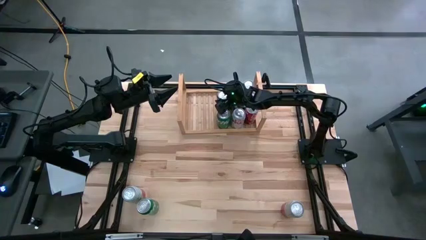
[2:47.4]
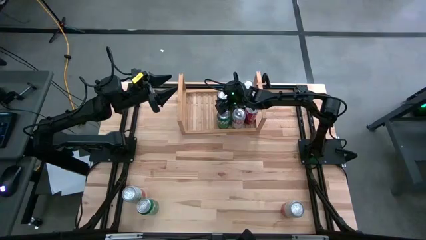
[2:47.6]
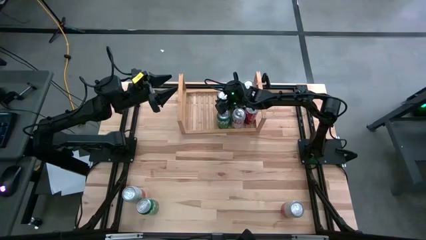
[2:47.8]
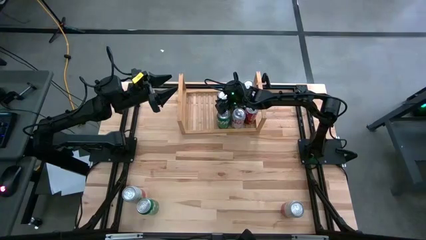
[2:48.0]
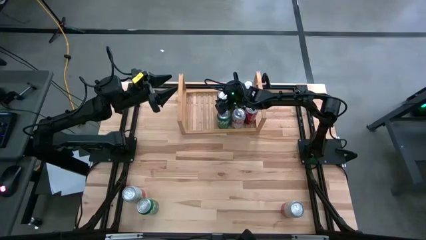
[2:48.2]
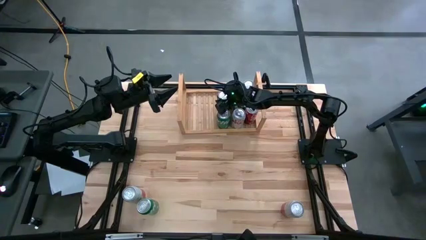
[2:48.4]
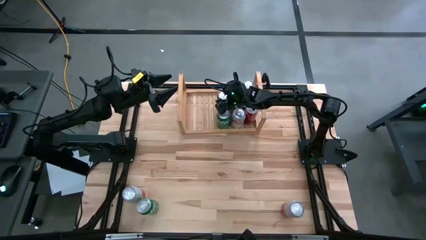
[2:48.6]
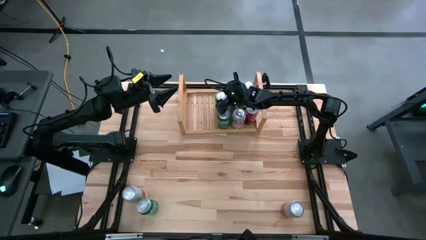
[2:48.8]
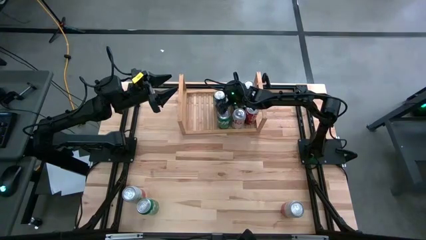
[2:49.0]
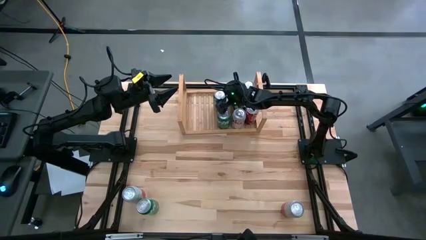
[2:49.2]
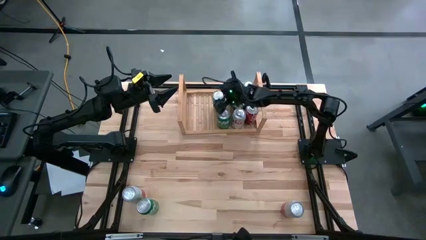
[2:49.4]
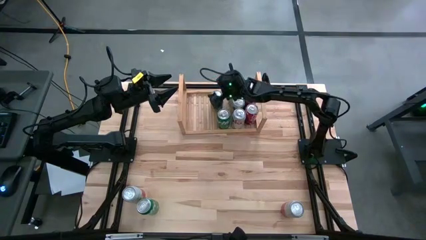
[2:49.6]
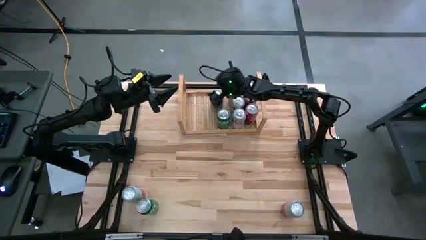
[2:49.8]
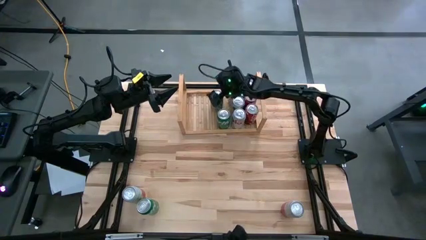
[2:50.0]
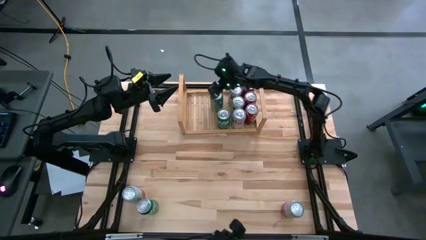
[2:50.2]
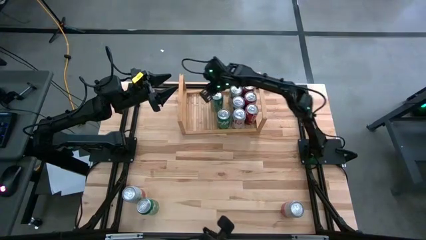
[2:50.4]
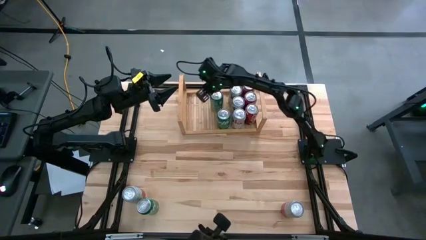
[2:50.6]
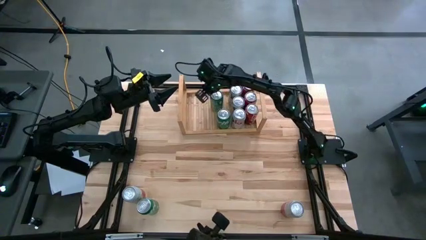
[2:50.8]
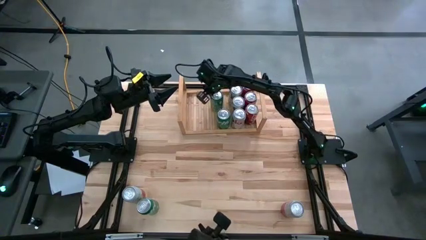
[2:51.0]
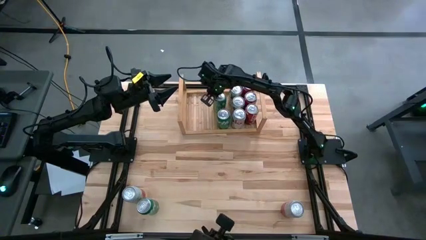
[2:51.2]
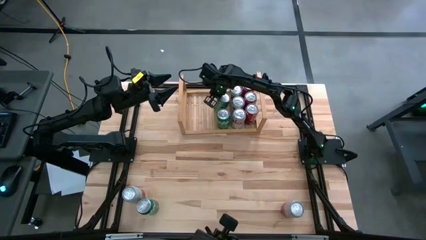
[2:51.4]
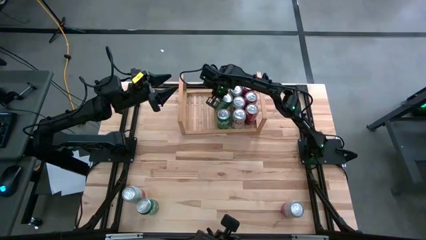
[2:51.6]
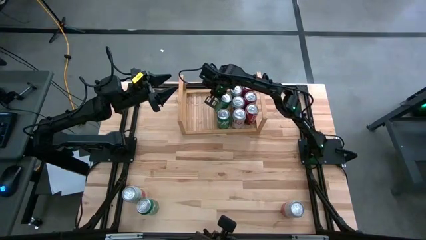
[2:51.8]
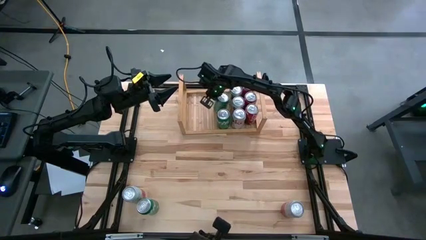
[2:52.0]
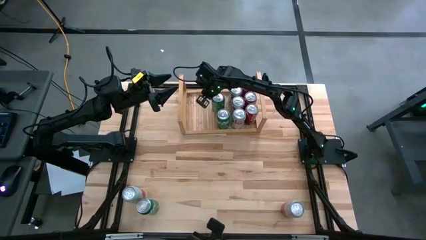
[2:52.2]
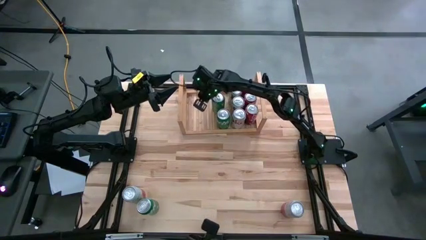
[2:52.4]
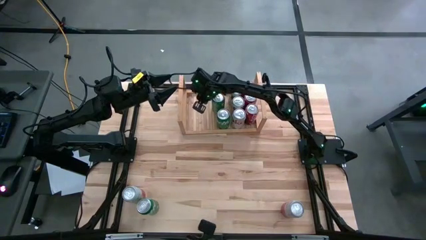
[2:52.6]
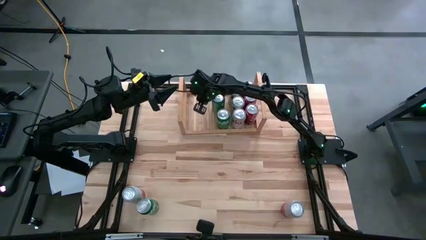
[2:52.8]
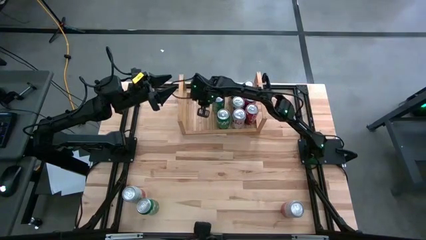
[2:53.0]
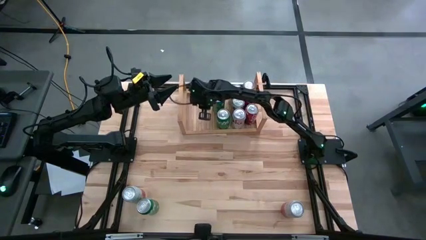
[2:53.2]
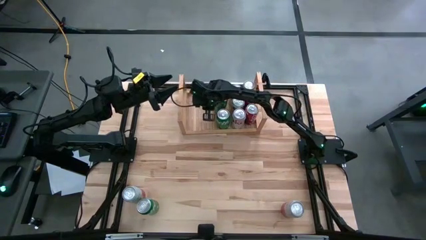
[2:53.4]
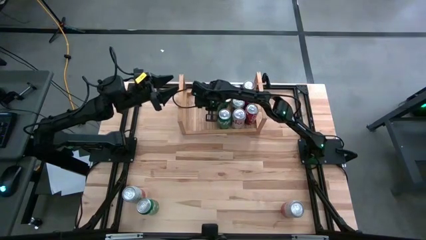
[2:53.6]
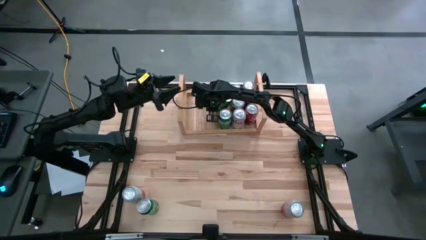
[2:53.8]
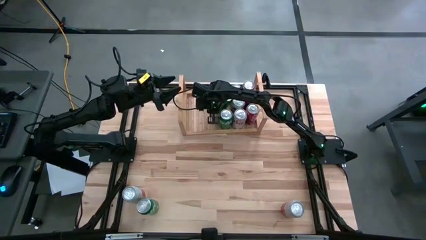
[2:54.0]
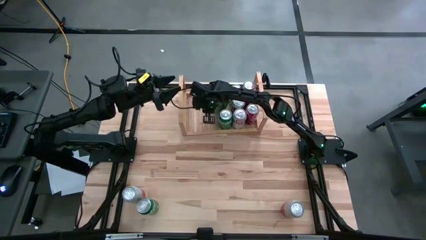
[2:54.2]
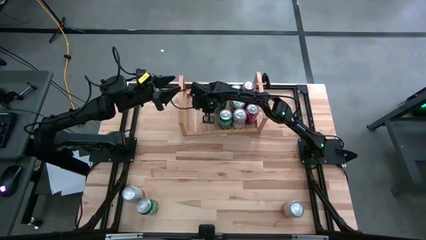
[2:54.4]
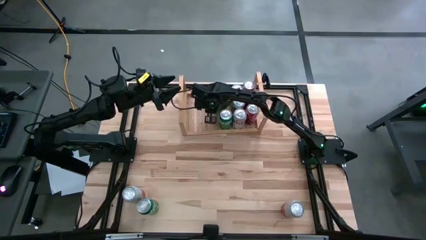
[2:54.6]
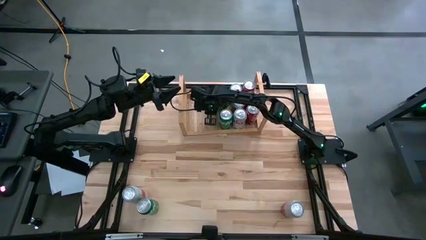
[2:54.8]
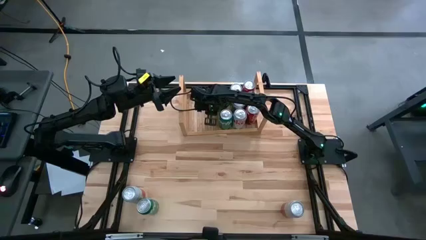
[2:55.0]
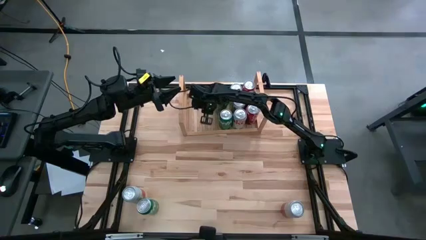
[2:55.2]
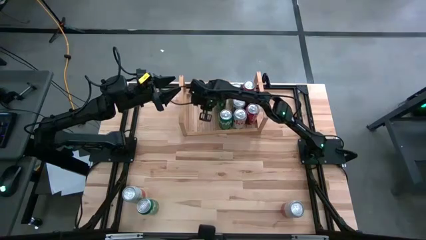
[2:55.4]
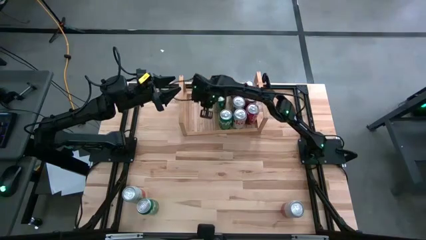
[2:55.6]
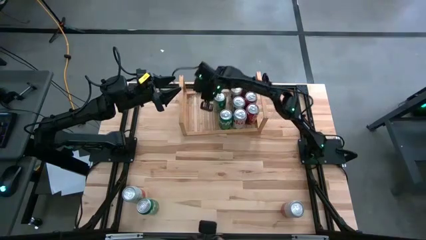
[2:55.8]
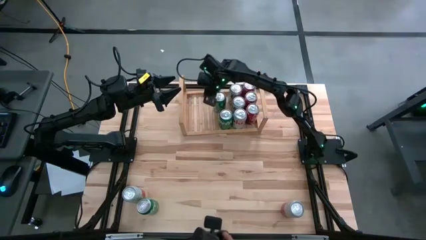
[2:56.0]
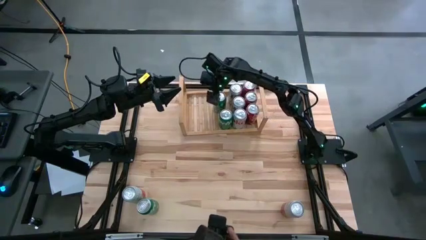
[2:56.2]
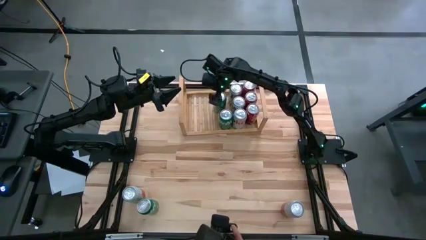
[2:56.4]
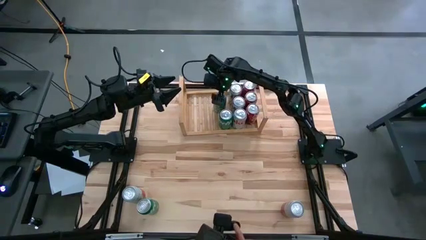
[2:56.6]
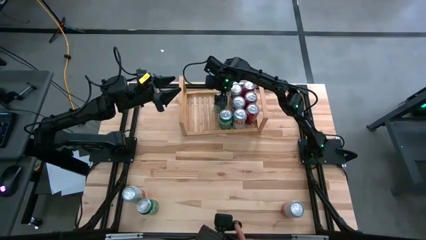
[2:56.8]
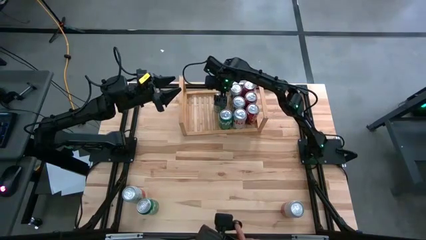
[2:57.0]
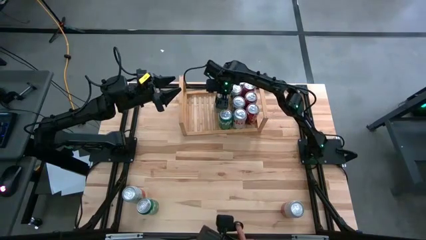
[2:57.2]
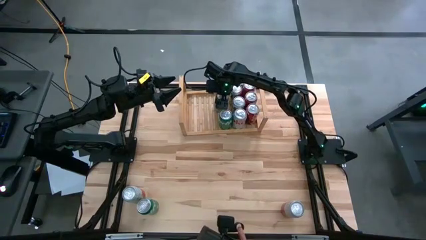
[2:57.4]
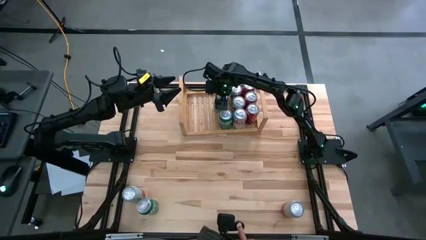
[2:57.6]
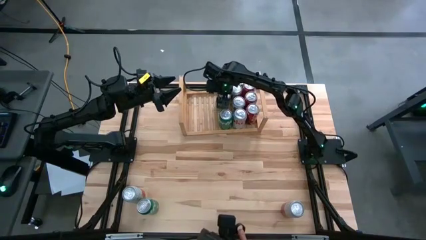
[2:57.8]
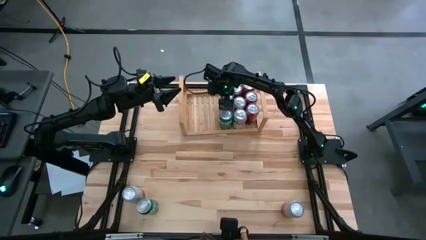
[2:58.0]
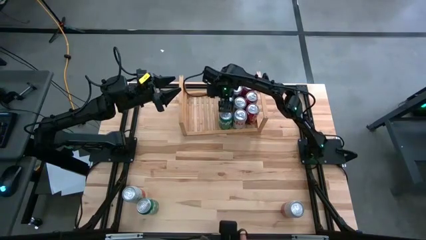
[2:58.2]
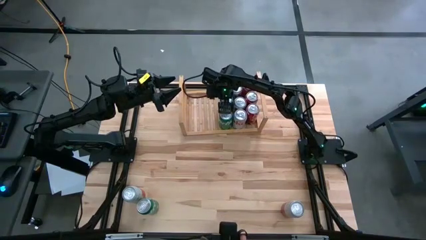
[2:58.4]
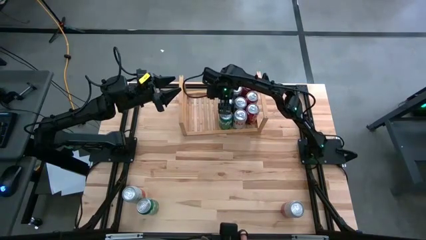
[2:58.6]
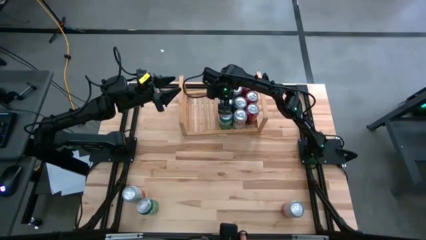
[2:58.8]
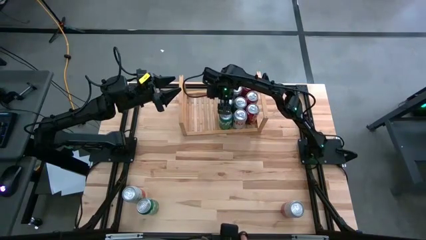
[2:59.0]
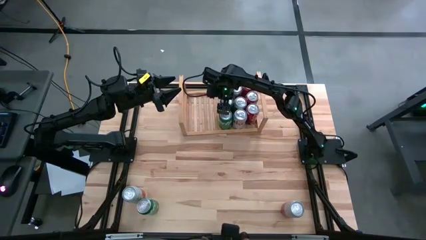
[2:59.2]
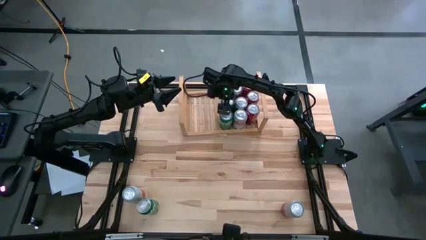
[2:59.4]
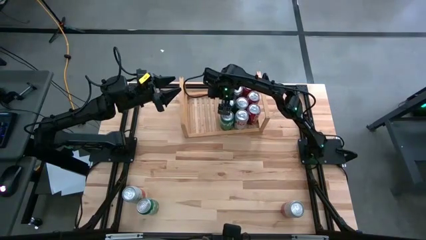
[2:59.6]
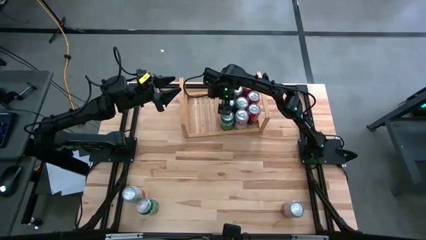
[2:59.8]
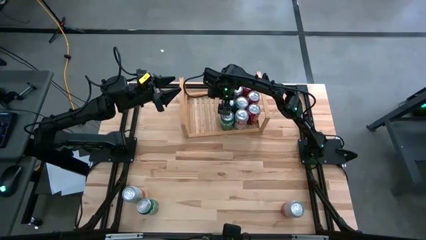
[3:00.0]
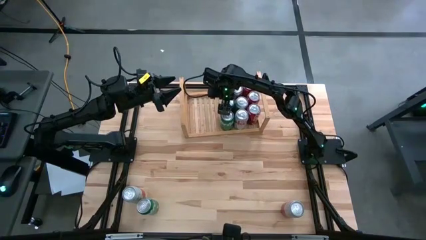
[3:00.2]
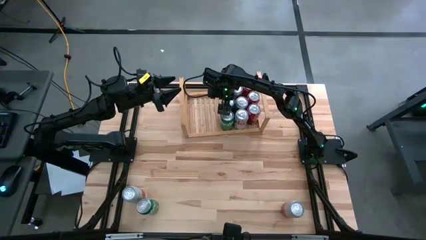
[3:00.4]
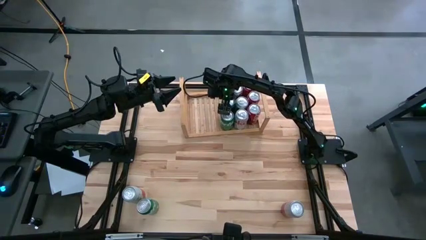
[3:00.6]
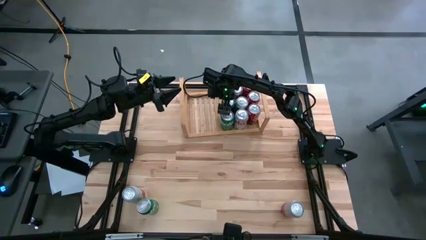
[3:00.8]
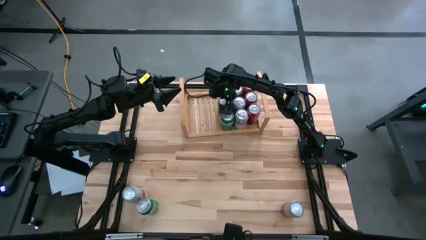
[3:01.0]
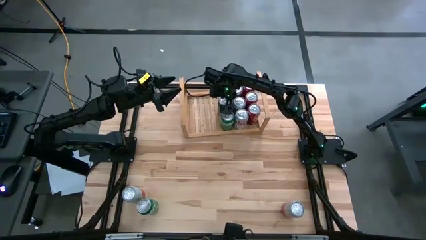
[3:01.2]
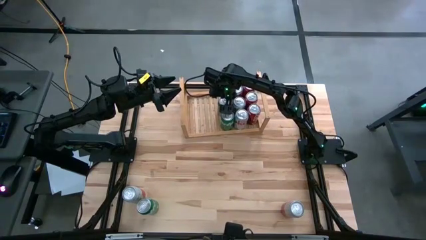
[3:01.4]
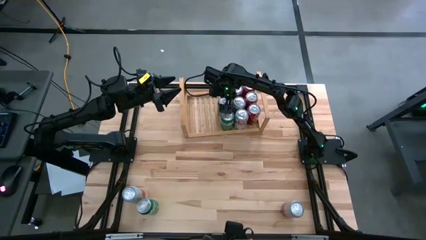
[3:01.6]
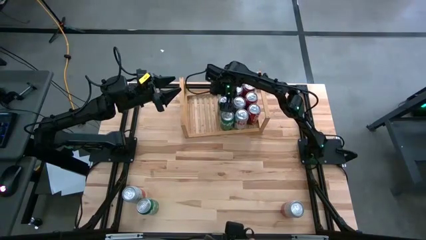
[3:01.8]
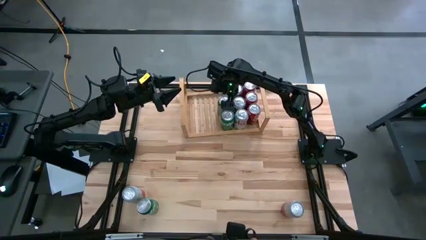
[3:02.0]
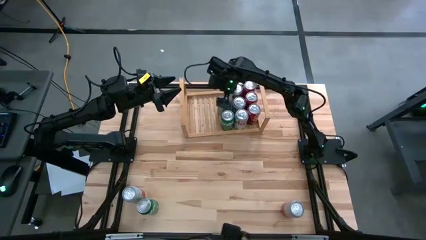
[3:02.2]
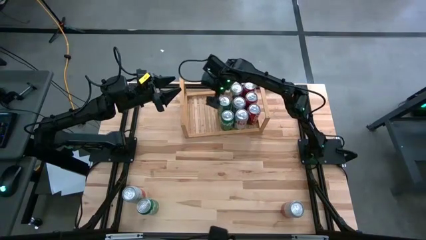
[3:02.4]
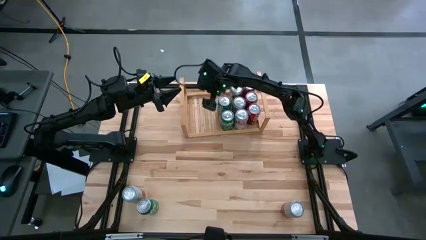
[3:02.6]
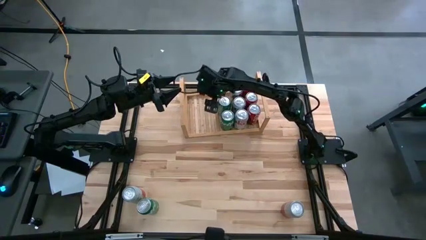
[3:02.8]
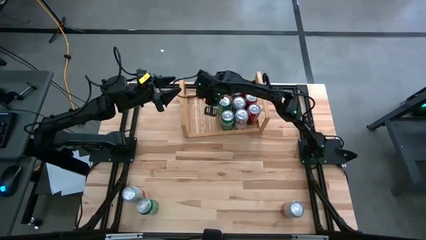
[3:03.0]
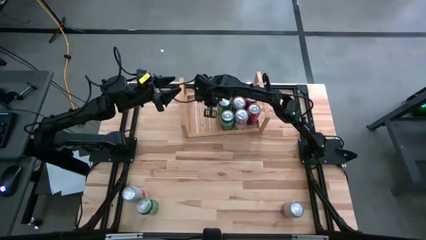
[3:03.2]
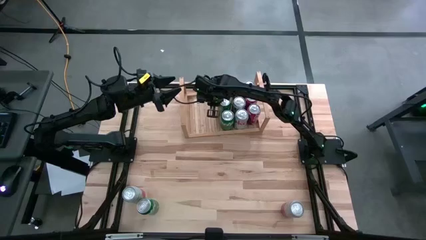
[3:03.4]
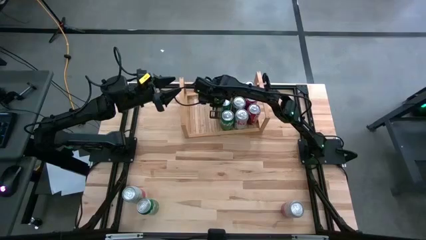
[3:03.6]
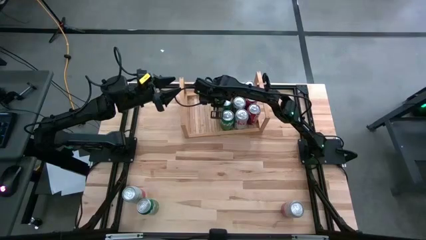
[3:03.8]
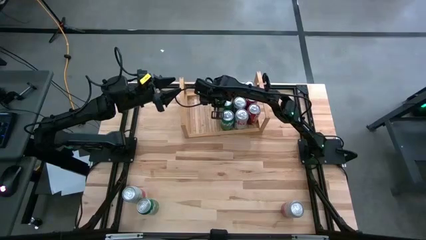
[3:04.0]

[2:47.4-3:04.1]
Task: Place canned beverage on shelf
Put the right green soda can on the shelf aligned with the other green soda can on the shelf
